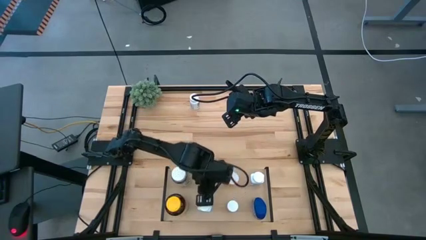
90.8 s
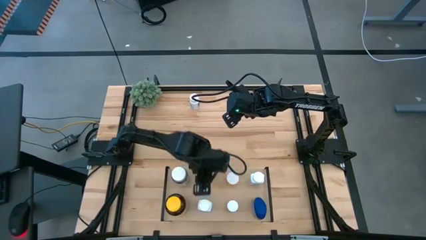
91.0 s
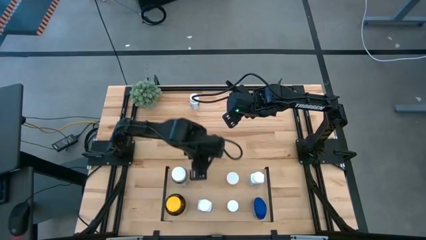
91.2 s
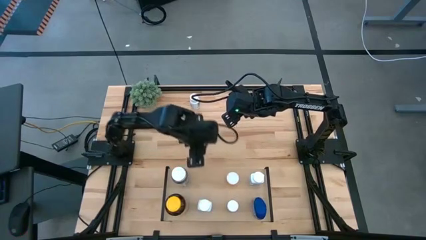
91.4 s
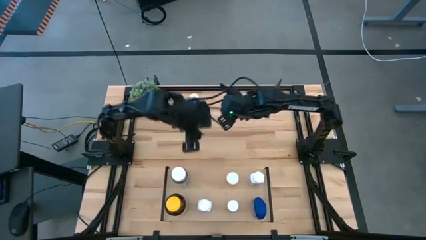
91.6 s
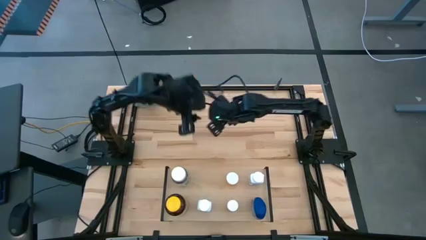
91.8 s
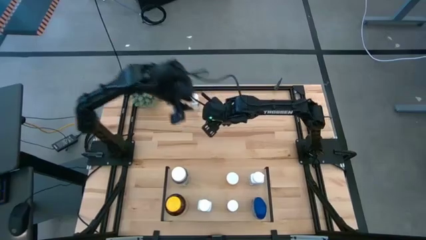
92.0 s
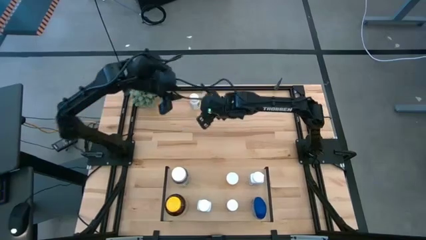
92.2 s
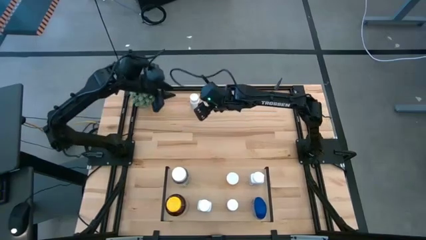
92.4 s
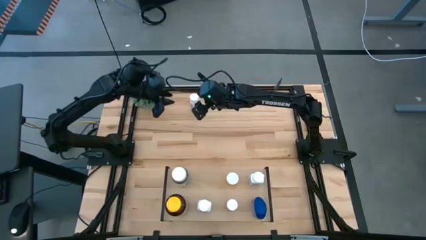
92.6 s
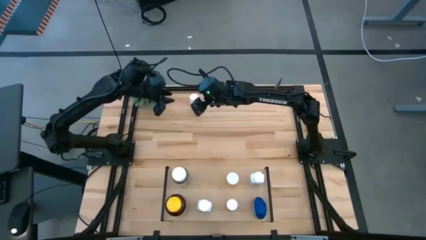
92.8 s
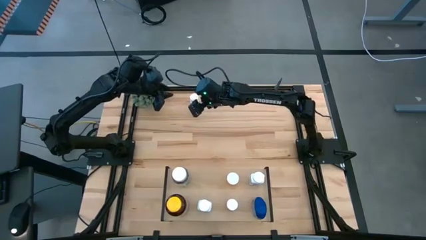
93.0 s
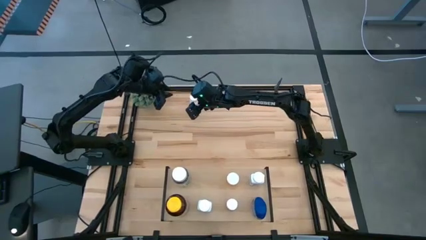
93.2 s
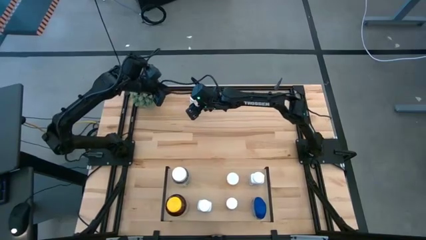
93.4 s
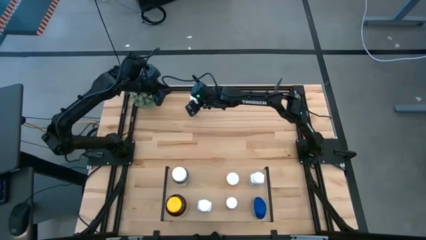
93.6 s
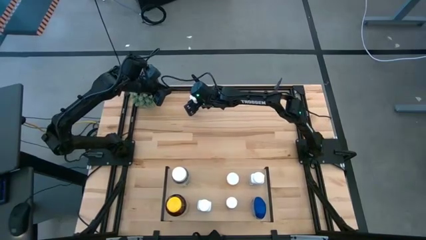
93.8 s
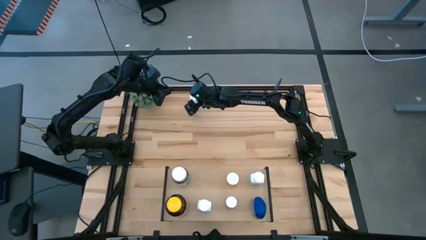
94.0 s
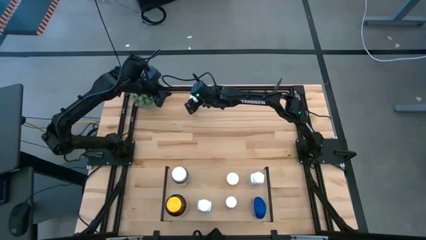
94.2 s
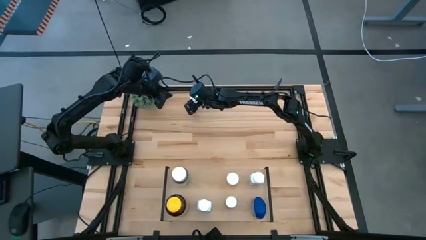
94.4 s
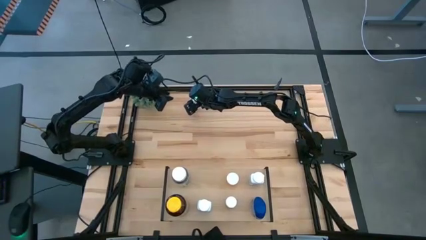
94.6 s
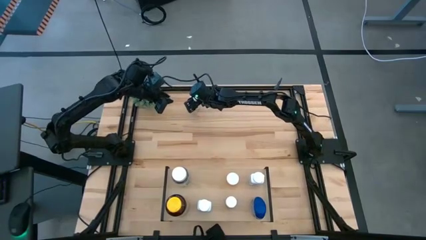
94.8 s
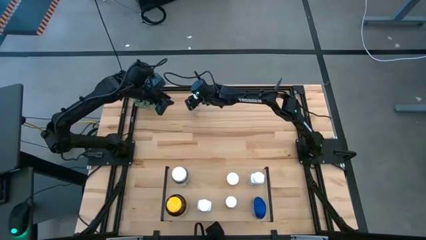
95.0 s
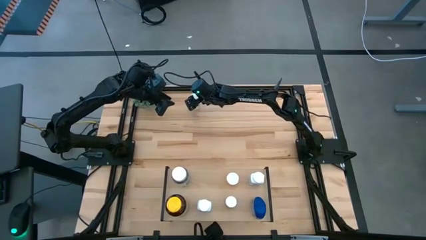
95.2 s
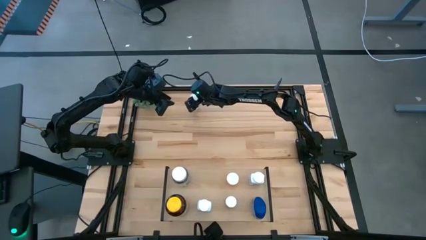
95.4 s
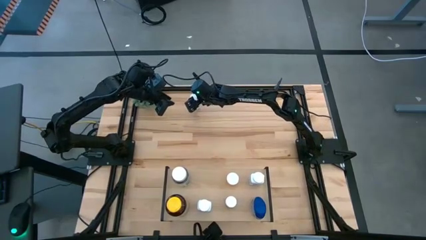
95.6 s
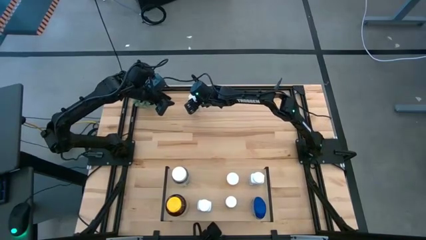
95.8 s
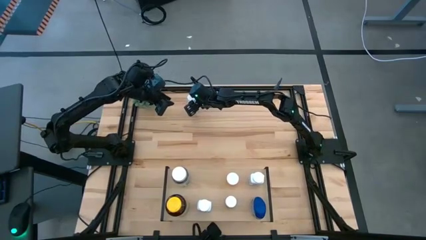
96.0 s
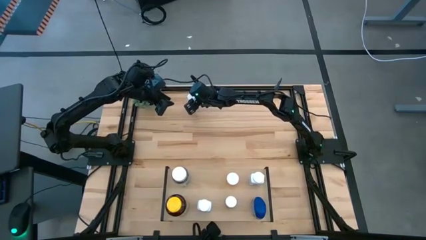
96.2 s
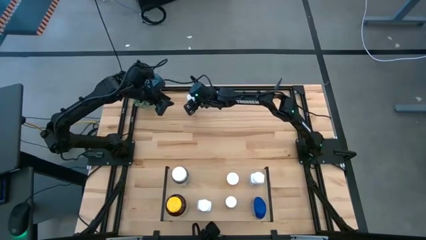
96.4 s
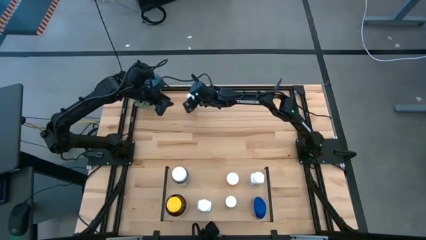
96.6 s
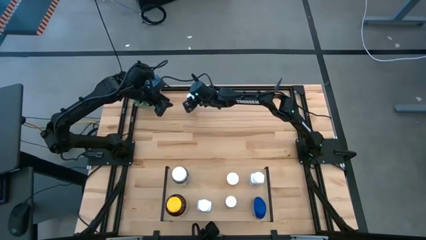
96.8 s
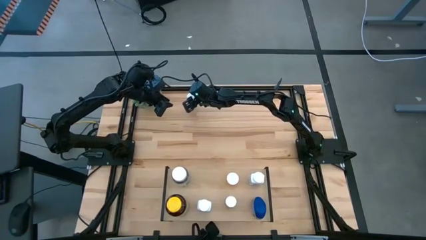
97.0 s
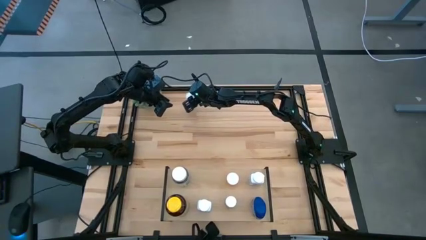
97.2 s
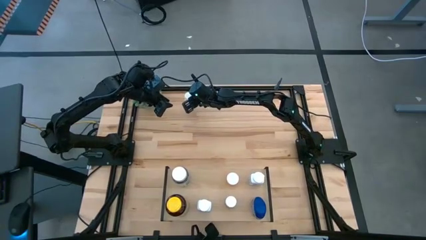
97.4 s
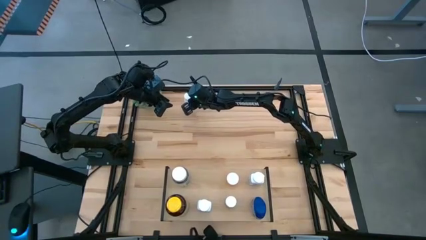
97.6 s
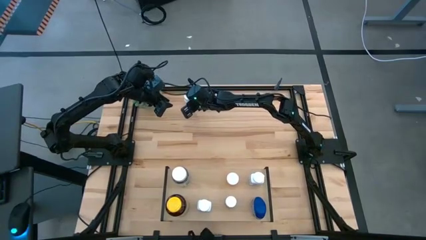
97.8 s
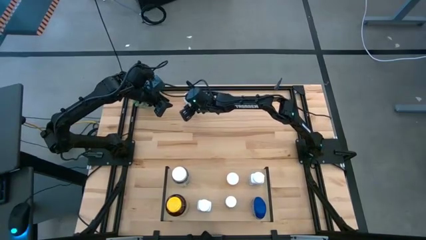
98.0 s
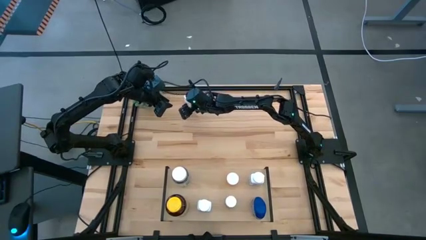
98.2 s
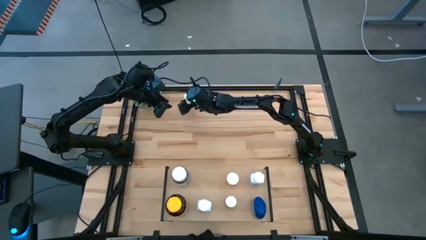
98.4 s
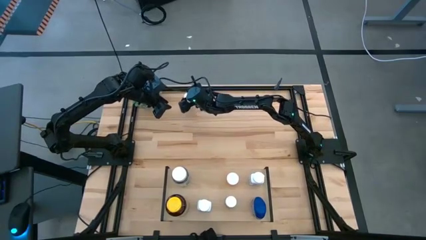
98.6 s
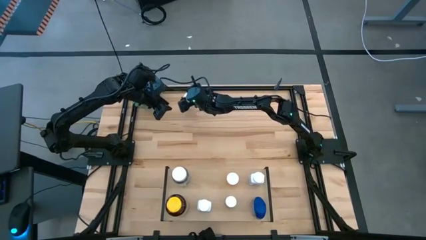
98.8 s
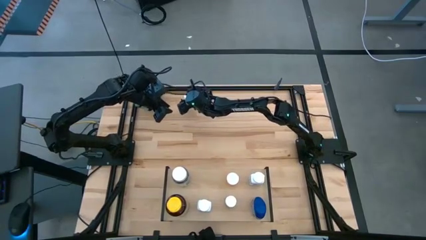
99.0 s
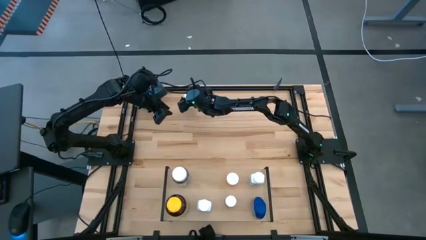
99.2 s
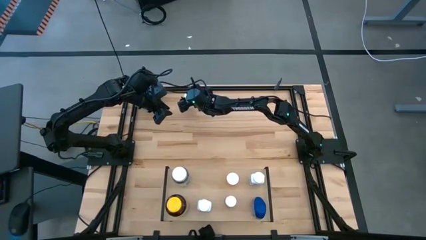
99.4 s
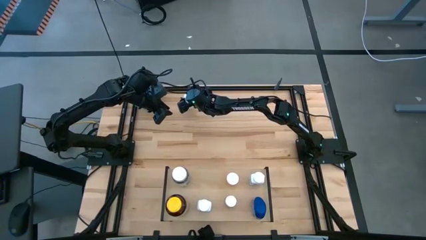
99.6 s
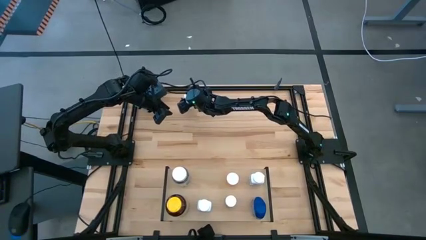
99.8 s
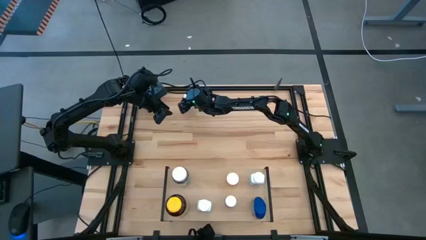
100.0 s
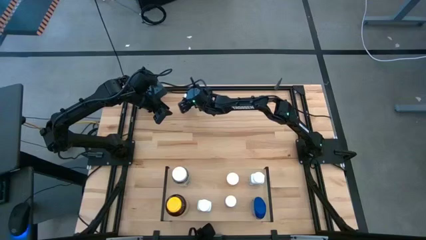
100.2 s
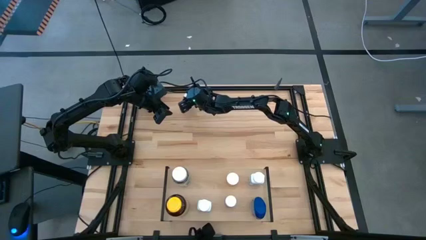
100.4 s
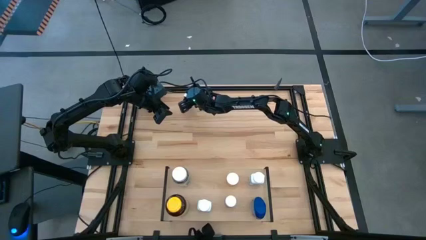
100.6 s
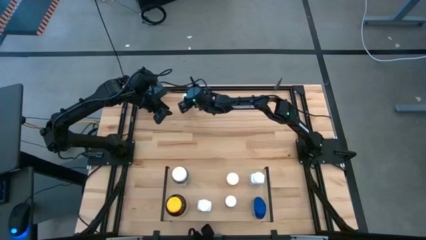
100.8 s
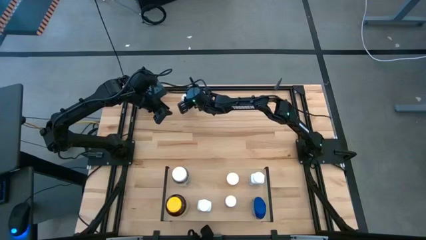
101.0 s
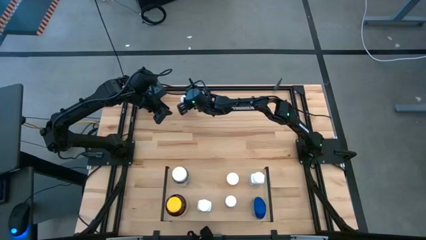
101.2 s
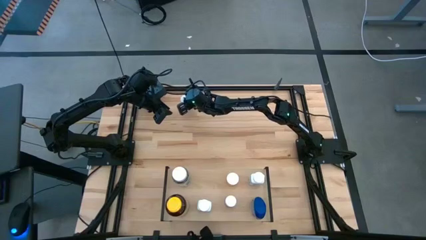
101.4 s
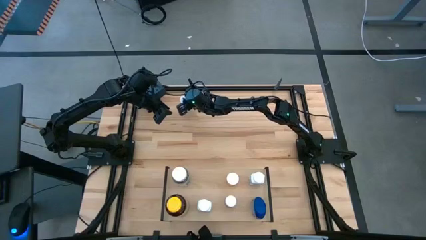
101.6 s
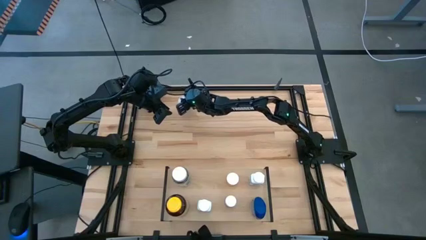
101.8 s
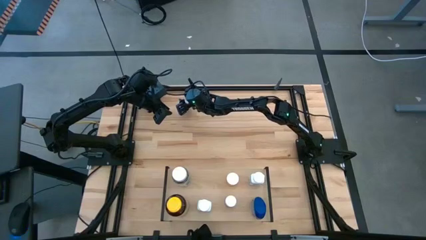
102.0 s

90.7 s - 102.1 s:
Task: Pick and place medicine bottles onto shelf by color
Put the white pill bottle on the shelf
